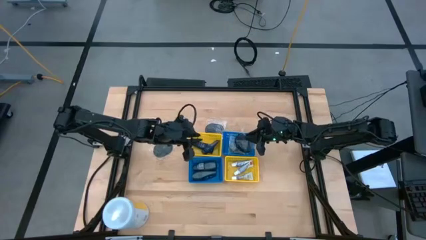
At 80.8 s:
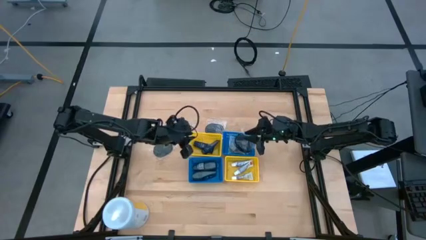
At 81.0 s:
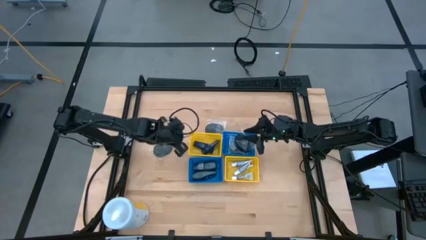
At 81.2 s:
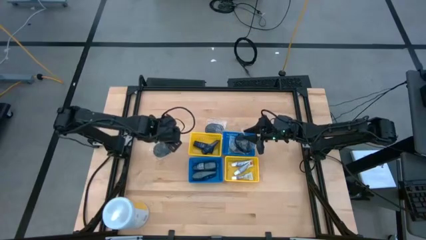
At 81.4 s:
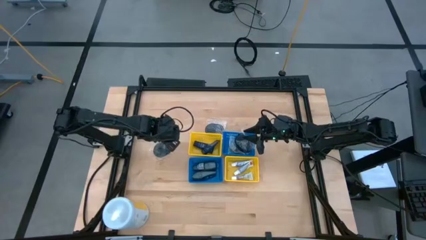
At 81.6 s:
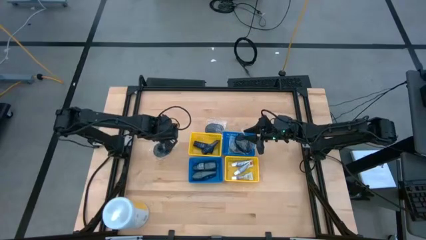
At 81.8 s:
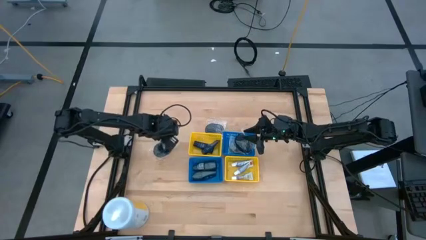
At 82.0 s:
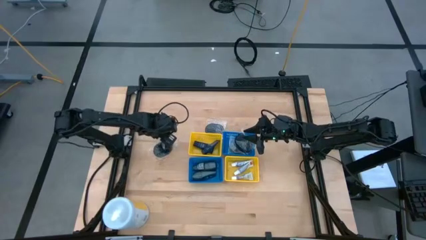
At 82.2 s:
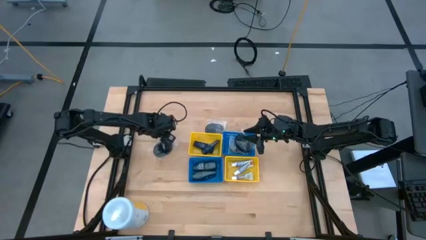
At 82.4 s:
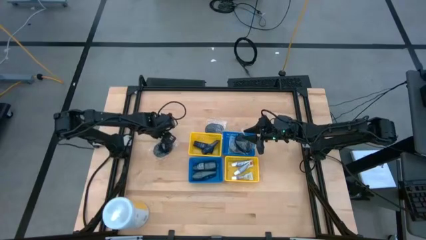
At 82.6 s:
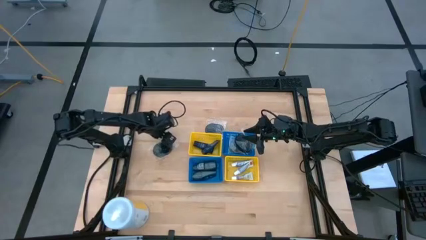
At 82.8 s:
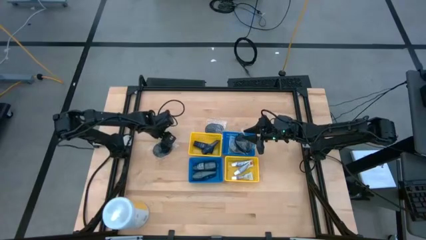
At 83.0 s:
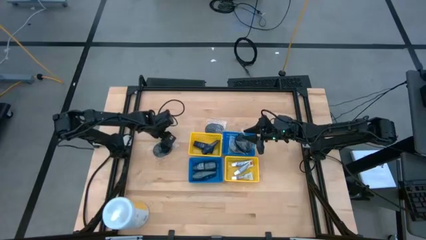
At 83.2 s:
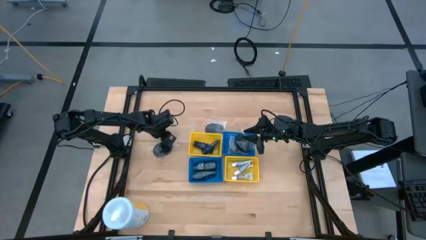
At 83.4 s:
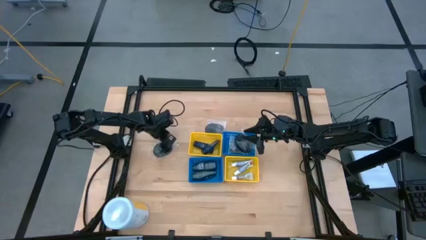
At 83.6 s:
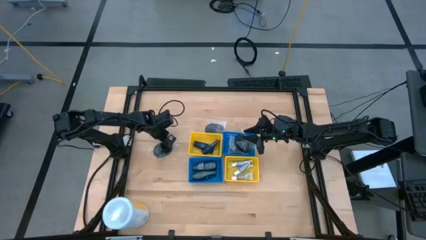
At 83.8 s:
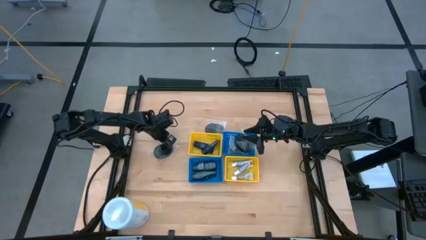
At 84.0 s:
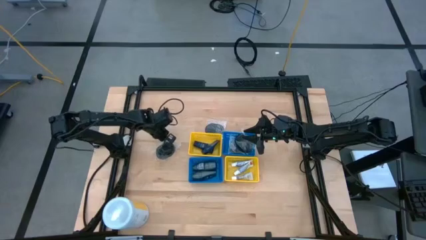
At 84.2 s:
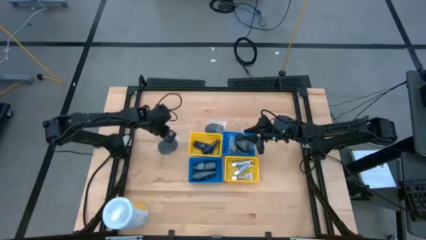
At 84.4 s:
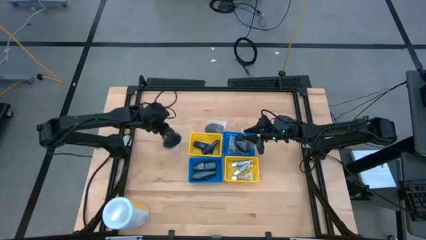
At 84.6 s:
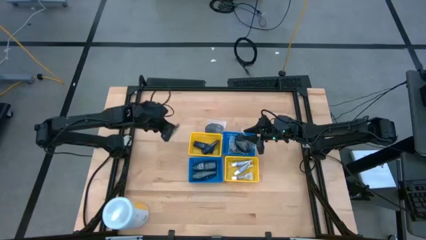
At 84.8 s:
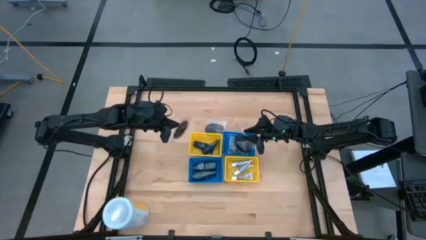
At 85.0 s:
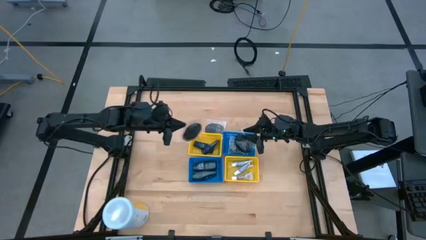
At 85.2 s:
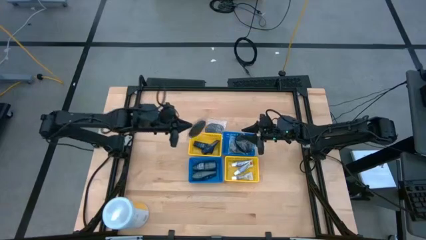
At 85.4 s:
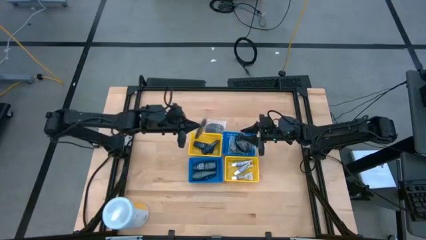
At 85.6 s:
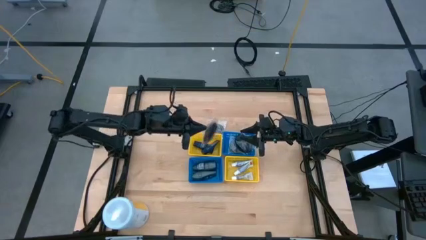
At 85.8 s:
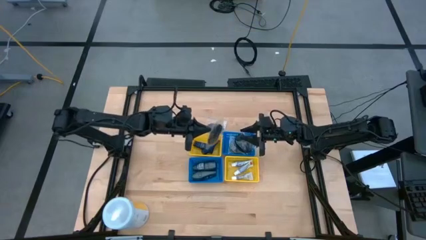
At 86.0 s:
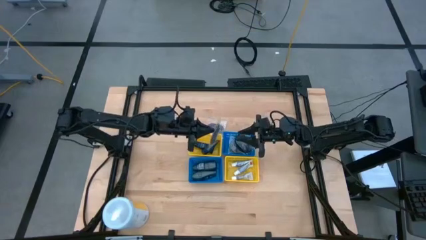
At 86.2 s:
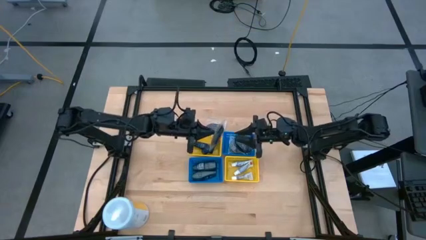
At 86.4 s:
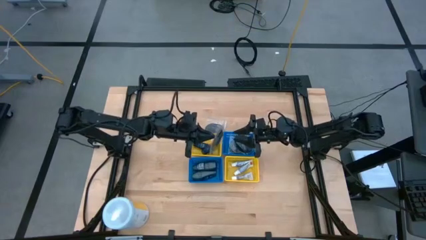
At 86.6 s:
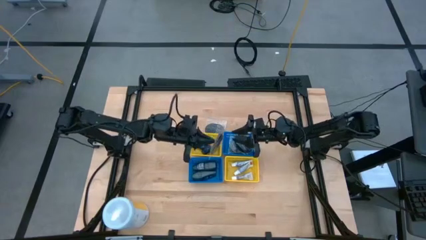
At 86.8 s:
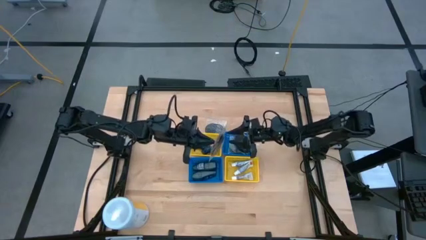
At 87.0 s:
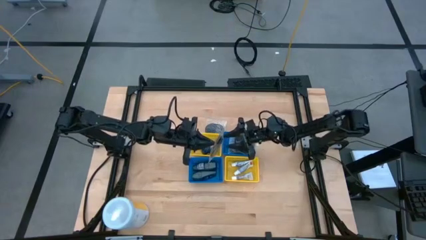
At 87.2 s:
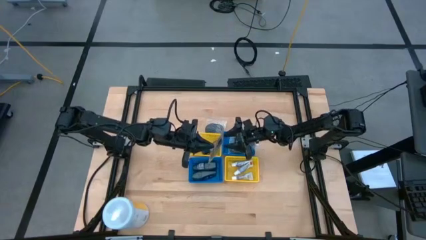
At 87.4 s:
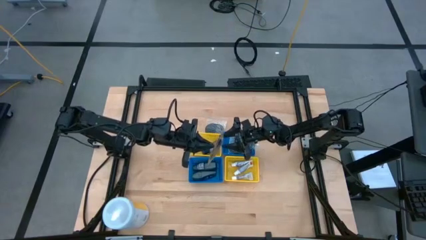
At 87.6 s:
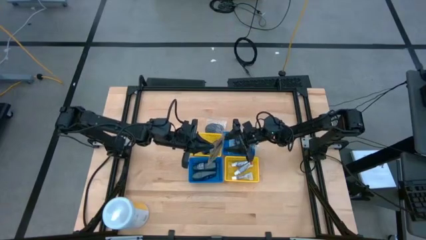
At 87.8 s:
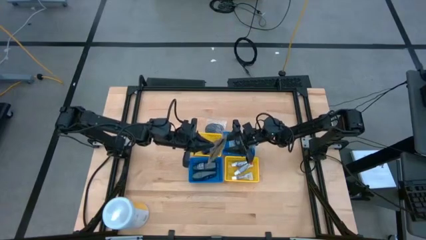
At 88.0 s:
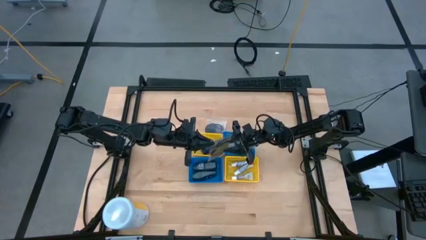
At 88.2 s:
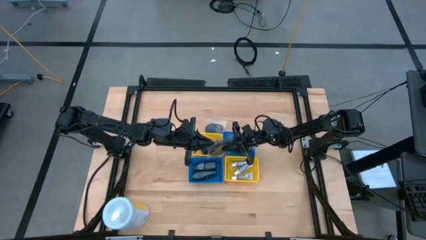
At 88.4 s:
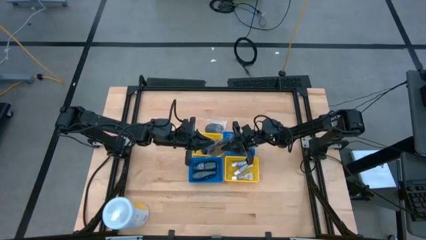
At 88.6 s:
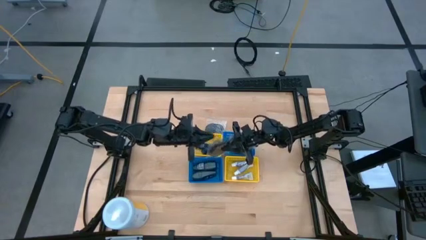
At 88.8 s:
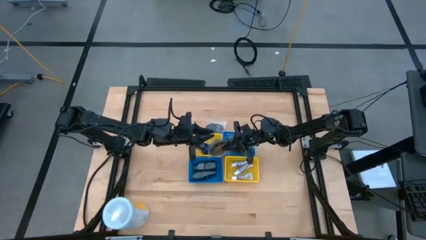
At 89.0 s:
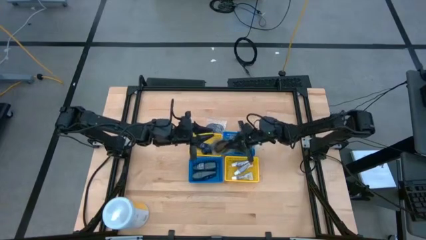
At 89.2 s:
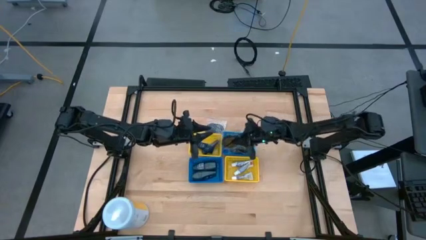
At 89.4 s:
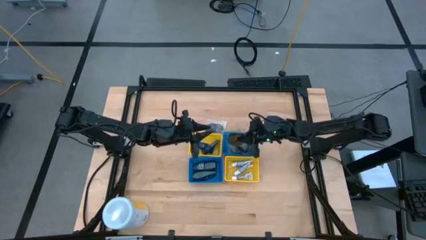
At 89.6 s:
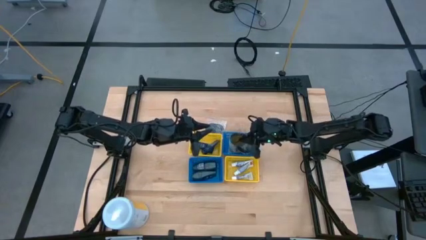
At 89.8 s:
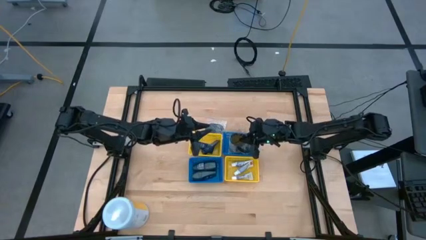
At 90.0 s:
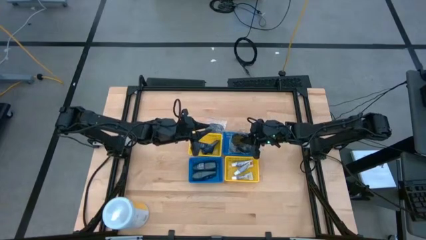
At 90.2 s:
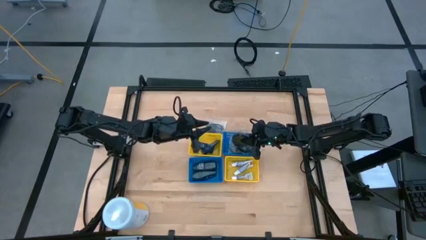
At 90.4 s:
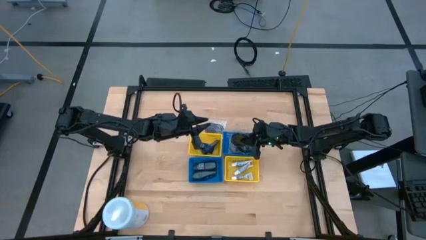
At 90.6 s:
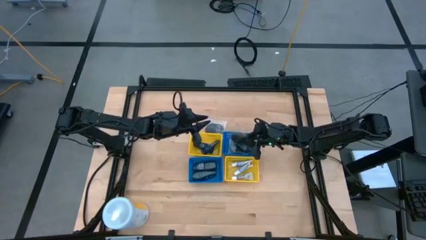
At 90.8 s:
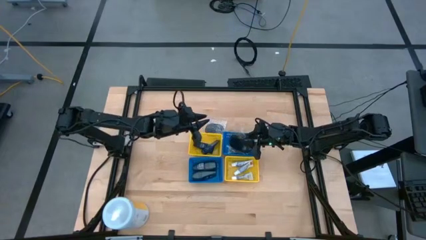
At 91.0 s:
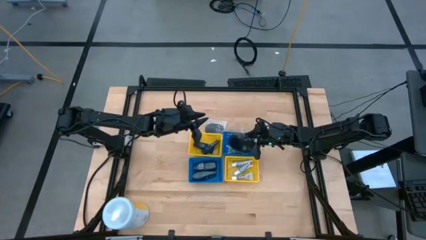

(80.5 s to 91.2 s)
Task: Pick & Place Travel size toiletries
Put the black hairbrush into the right blue bin

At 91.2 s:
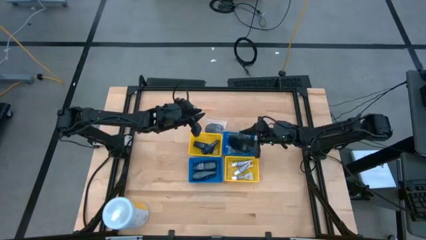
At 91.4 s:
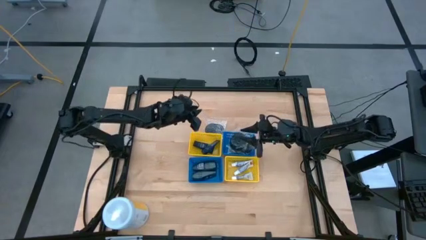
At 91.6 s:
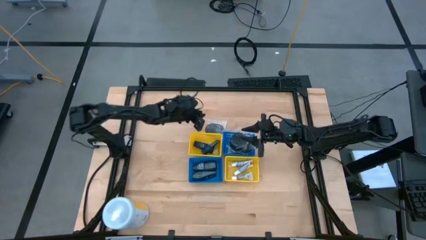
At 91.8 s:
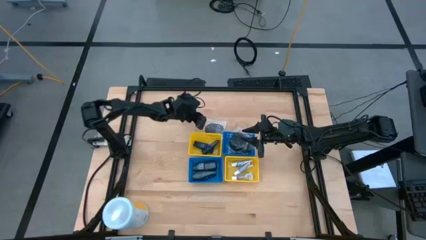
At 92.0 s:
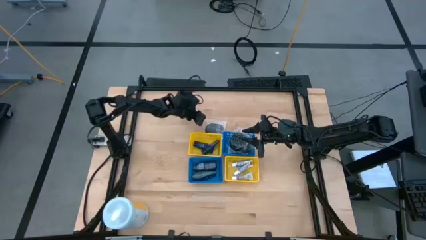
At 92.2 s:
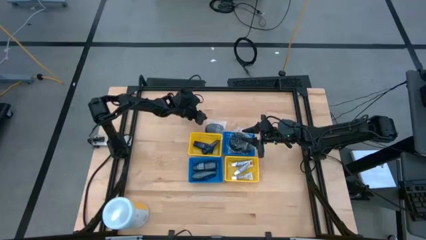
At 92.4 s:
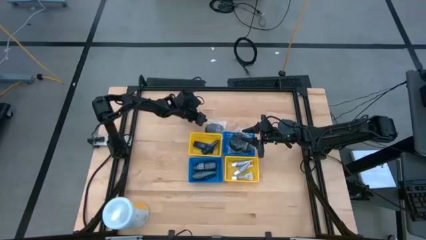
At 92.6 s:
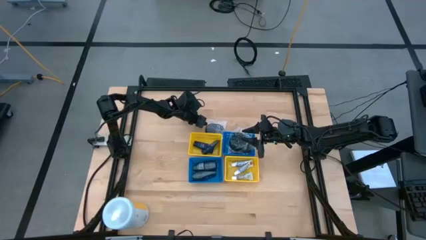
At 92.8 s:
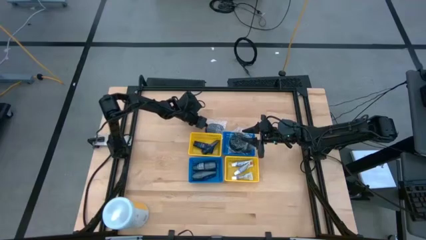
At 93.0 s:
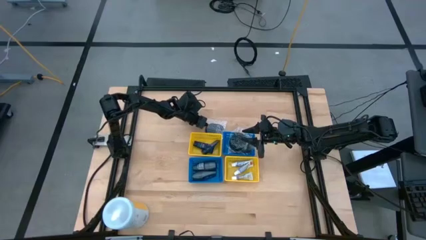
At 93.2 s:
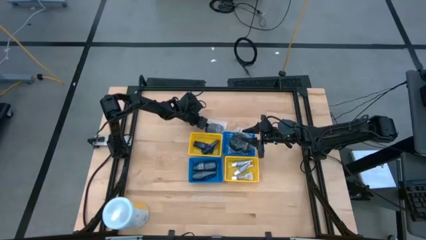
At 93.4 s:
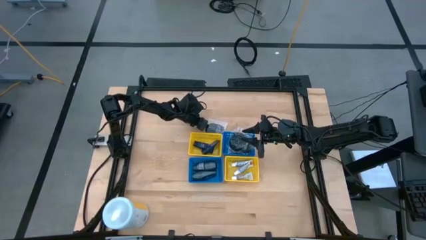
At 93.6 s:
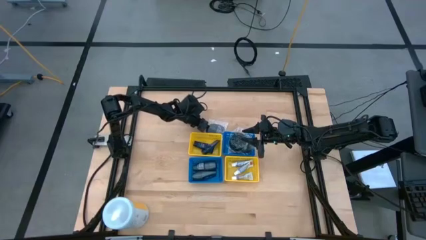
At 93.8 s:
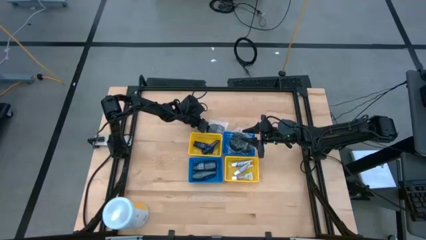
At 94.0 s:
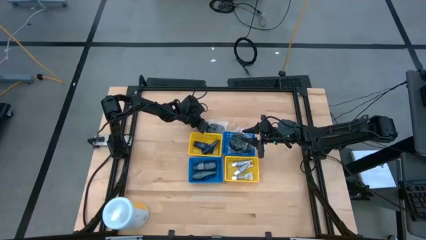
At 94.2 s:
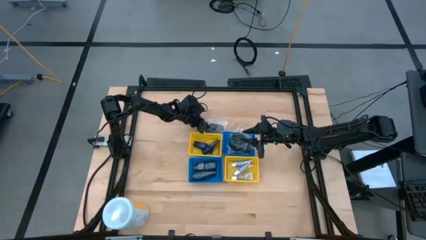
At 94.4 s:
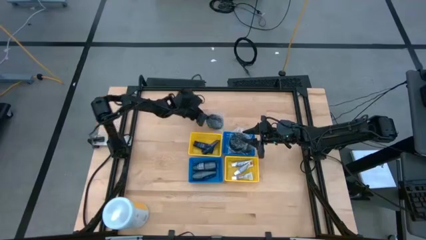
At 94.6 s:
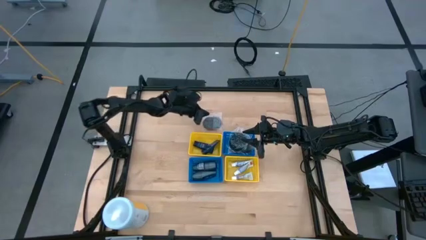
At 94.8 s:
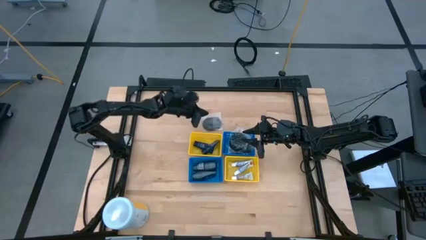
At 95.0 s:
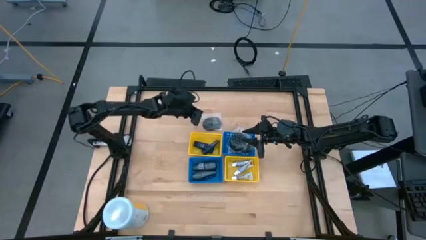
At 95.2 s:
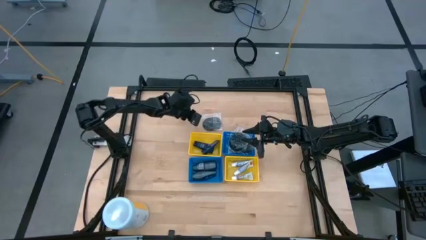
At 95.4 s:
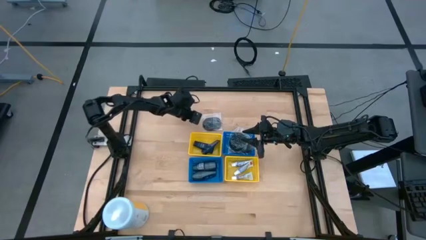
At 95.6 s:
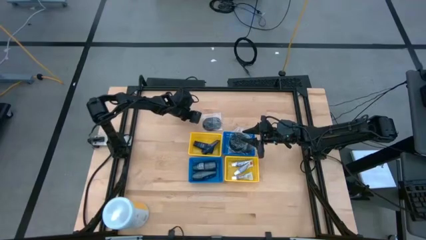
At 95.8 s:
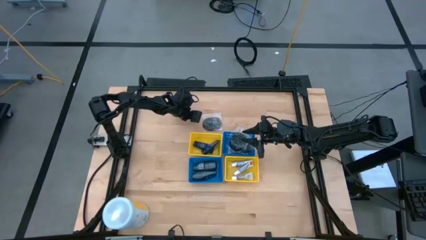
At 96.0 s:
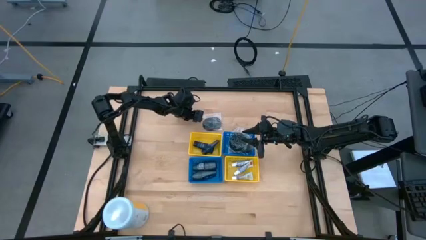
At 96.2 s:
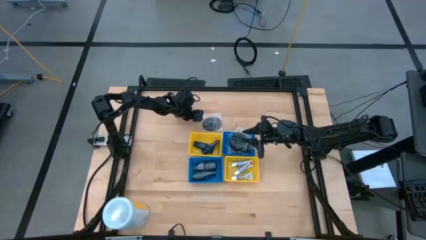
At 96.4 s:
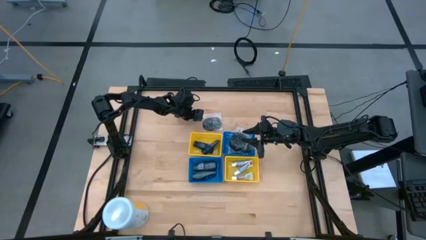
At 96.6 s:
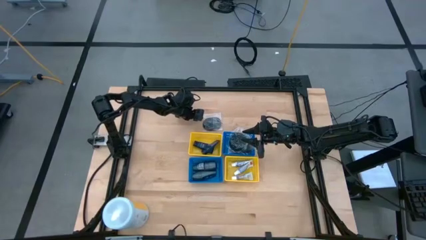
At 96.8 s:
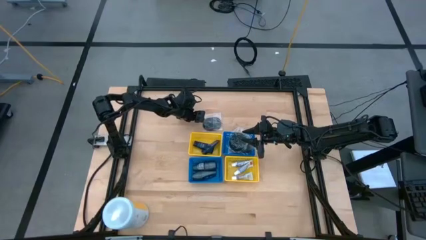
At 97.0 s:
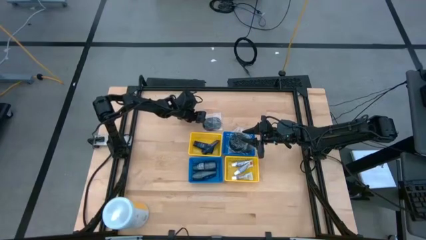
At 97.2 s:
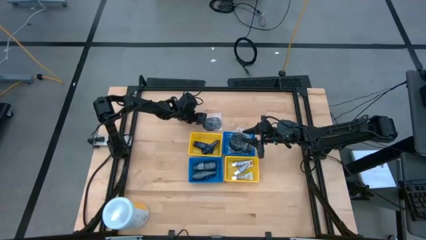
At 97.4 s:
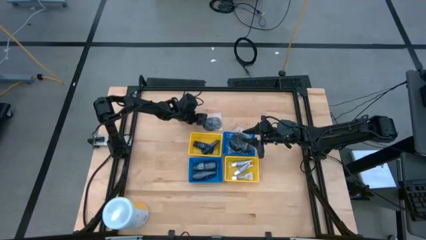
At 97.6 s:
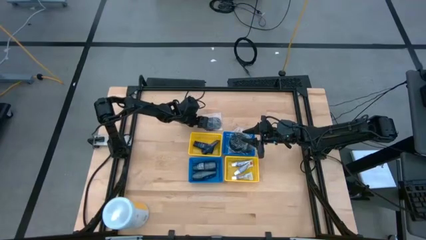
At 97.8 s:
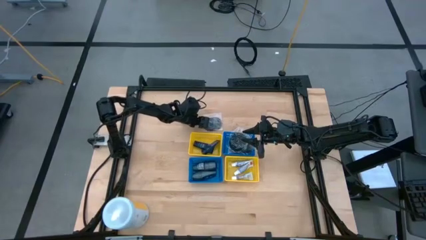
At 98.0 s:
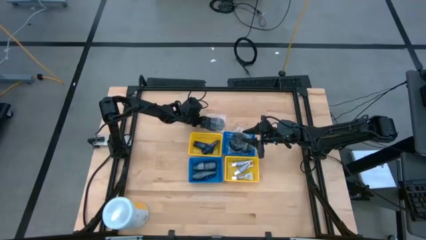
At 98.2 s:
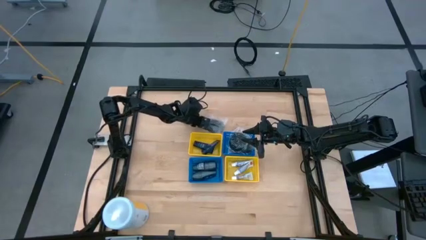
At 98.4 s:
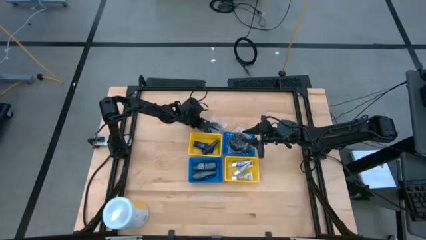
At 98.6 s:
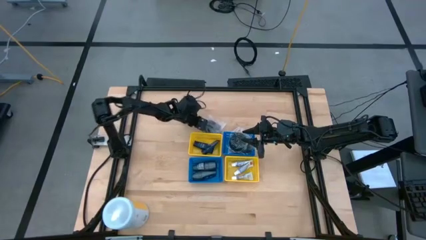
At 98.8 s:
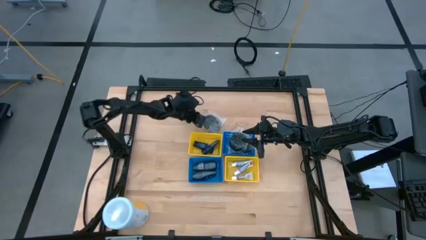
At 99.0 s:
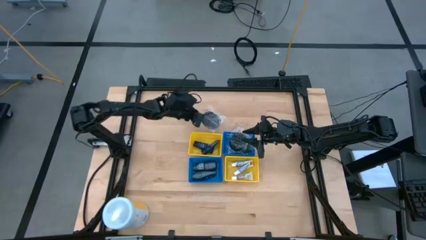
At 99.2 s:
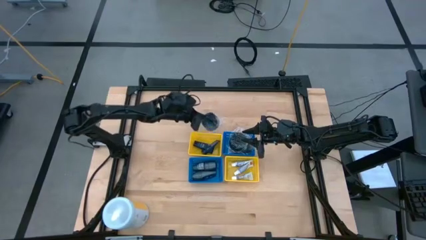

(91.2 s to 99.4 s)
Put the black hairbrush into the right blue bin
